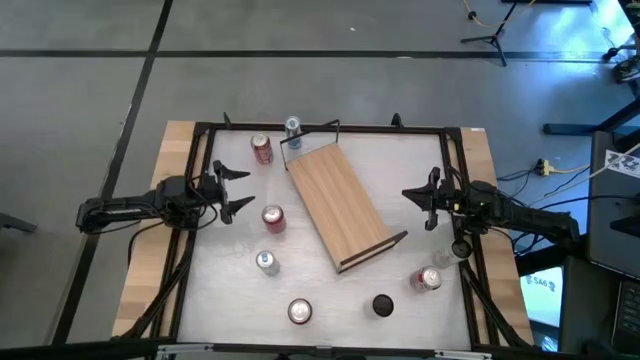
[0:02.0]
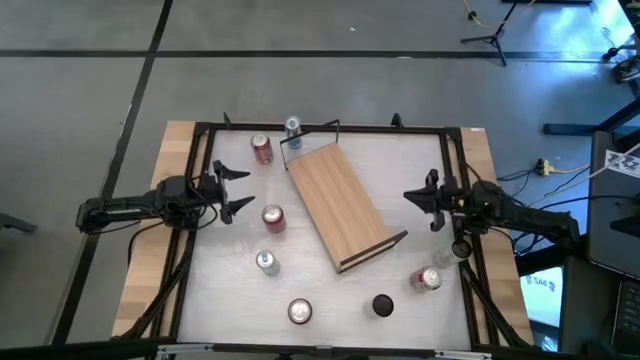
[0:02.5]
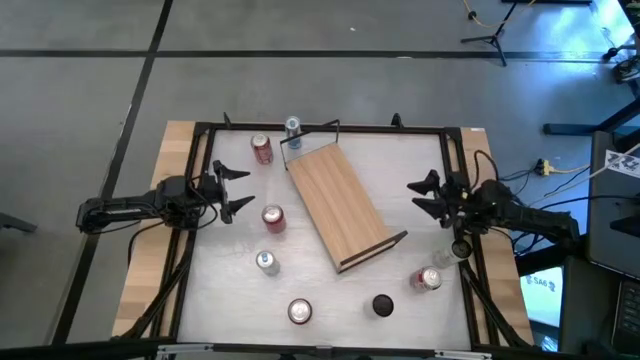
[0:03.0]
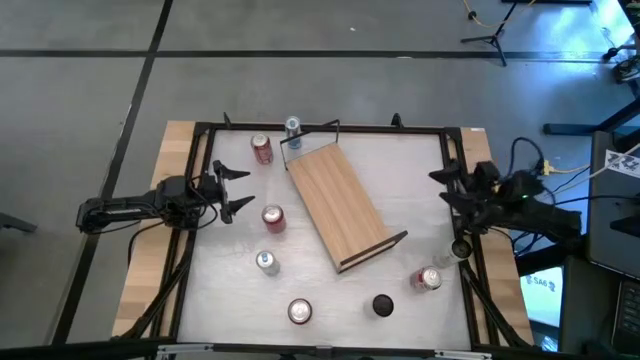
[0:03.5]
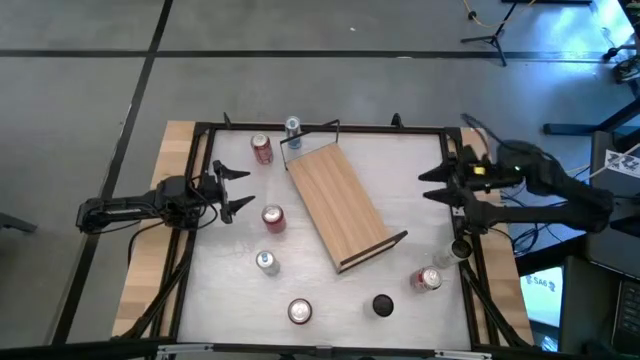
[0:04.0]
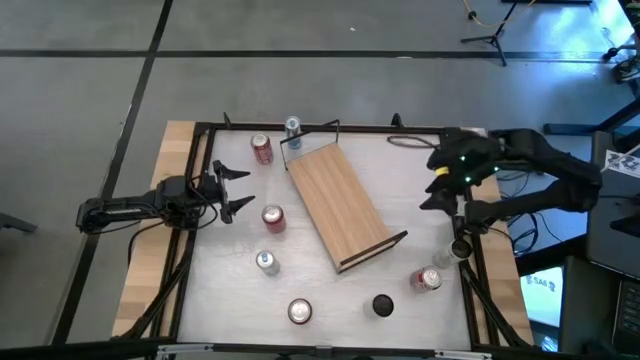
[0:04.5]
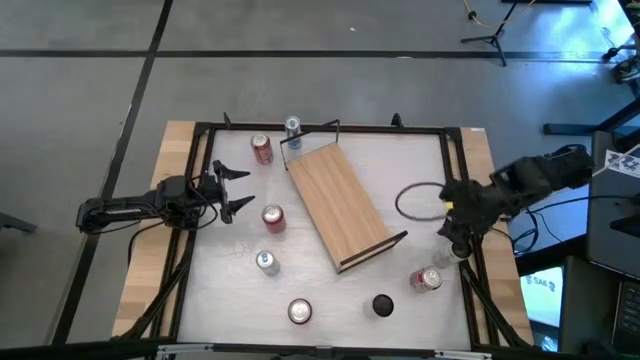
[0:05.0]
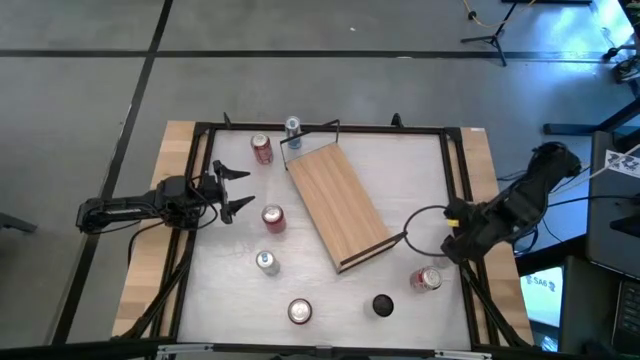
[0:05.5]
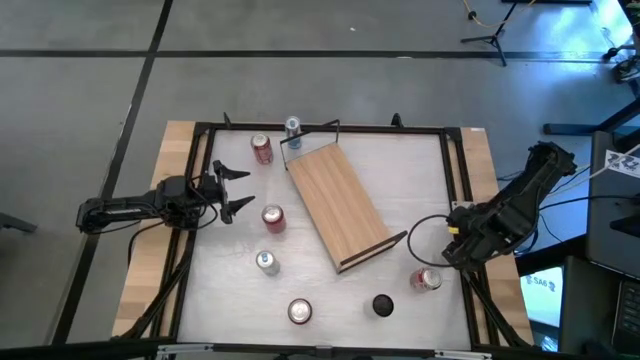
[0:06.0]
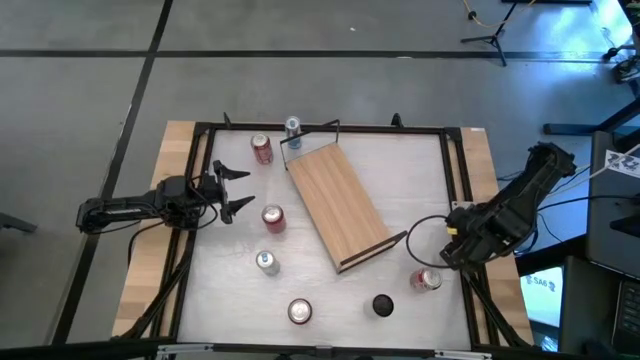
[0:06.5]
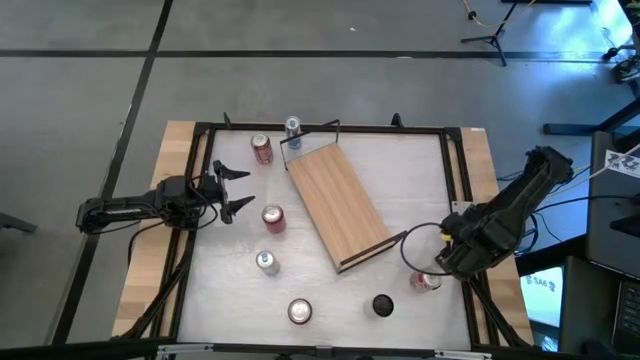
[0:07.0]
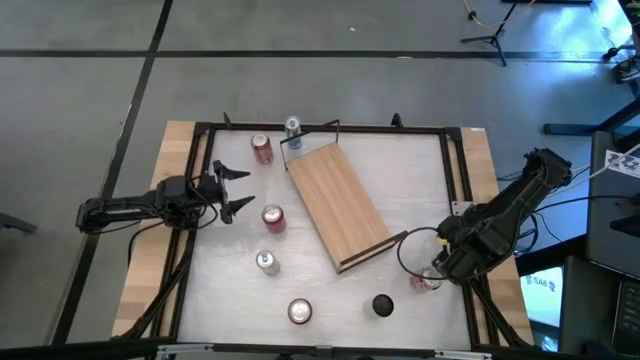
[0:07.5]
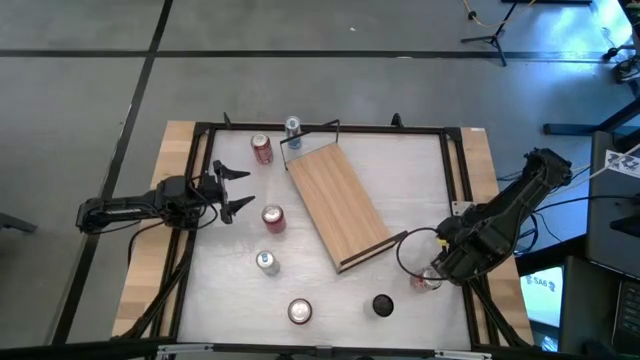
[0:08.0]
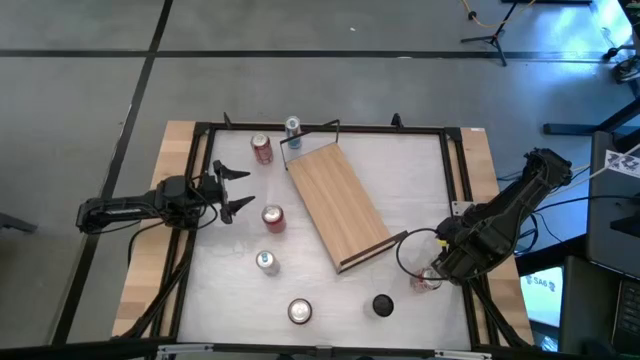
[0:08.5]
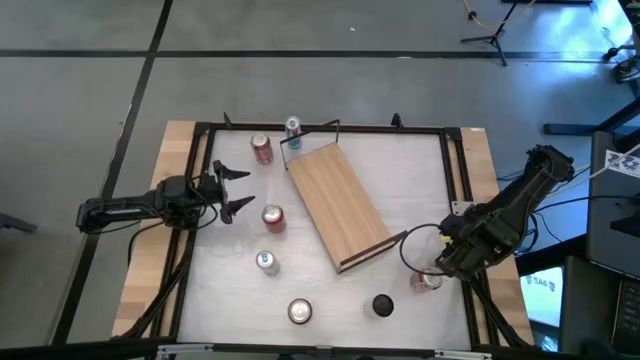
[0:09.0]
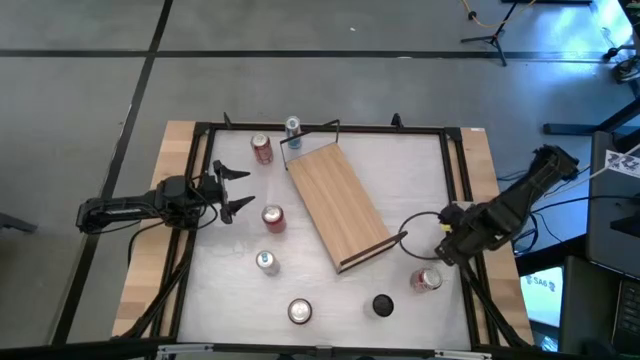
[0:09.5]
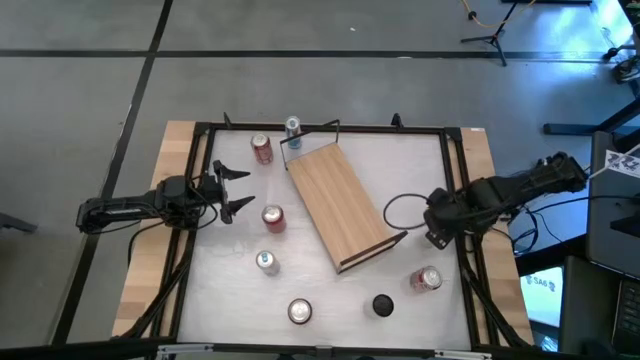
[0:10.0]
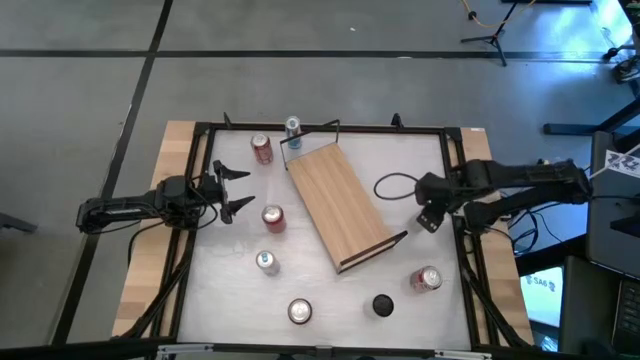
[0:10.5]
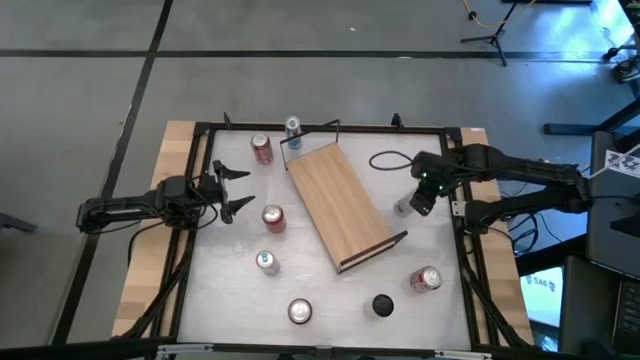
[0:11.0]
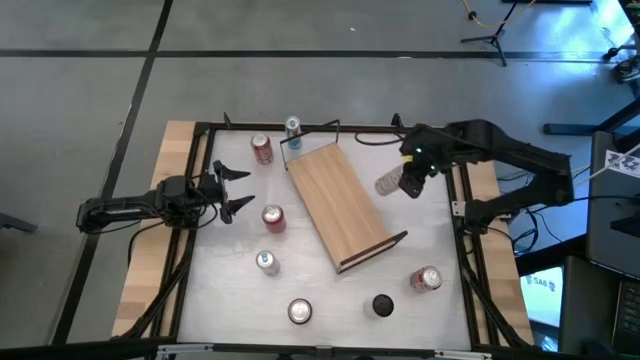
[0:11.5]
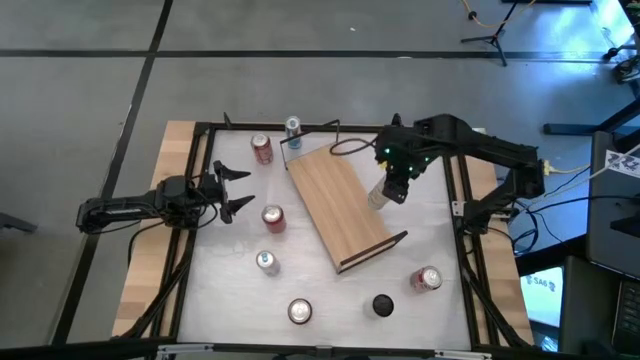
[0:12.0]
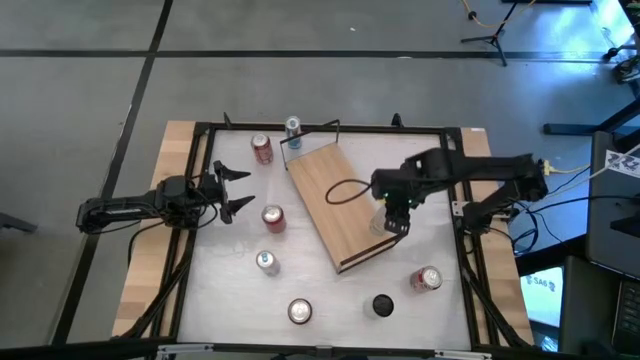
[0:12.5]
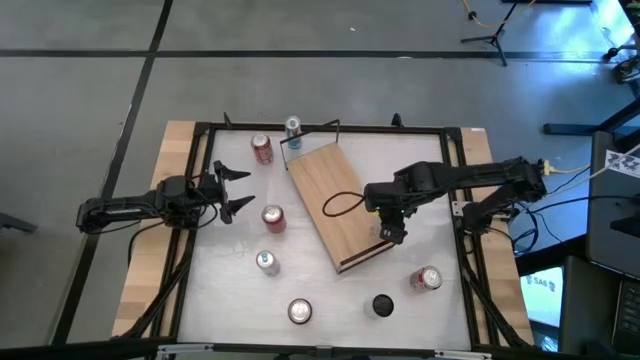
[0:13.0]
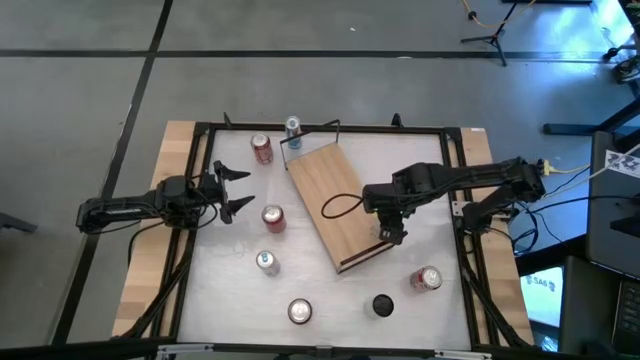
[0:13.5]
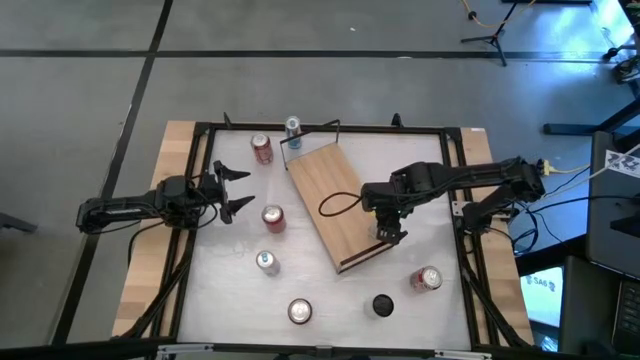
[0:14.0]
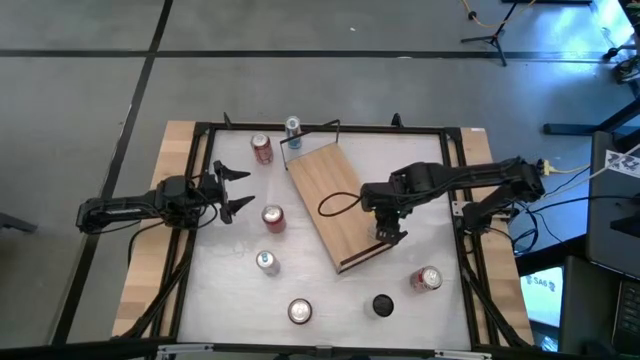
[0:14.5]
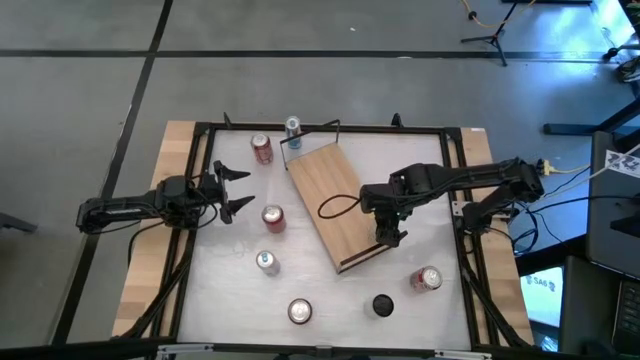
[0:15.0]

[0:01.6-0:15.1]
Task: Place canned beverage on shelf
Put the top white yellow soda can on the shelf

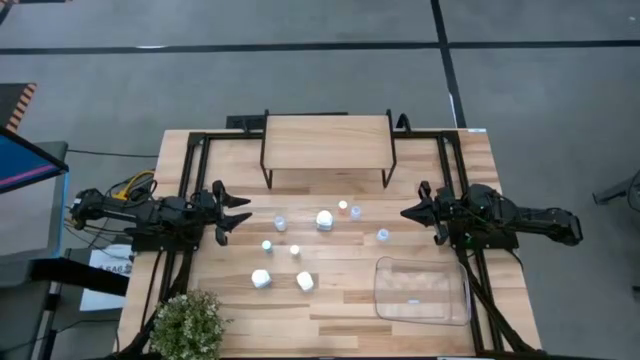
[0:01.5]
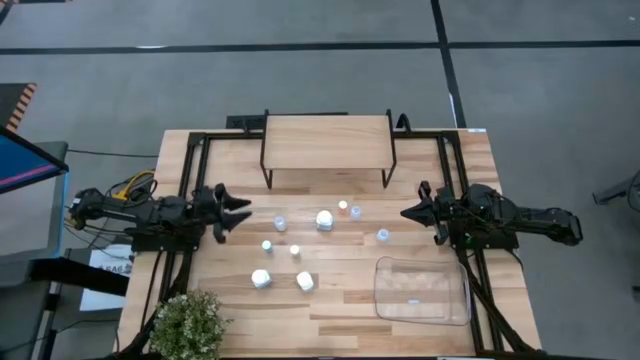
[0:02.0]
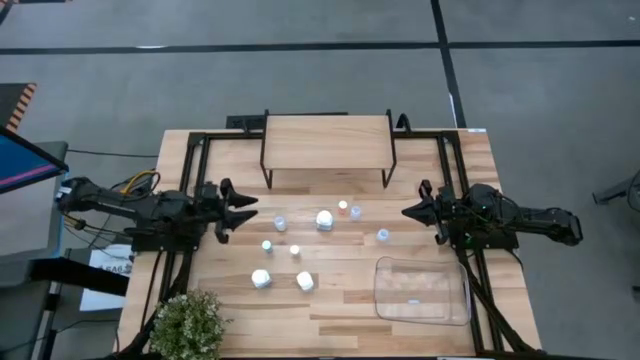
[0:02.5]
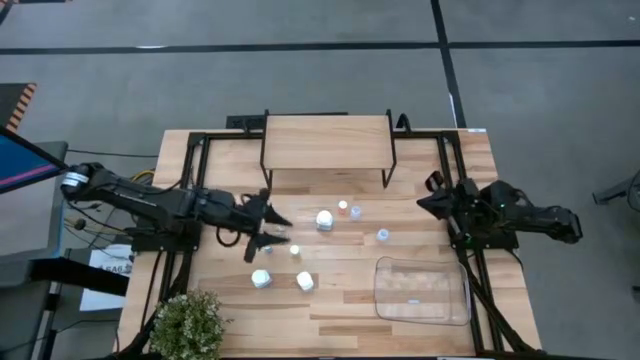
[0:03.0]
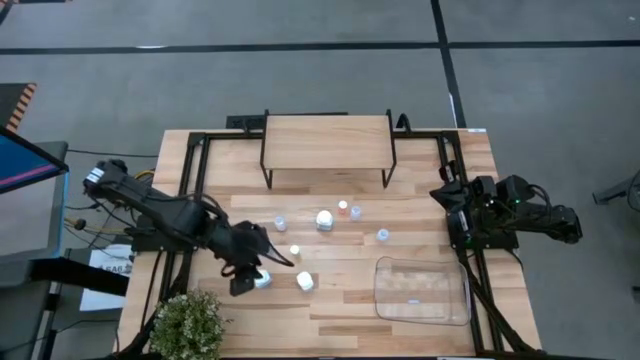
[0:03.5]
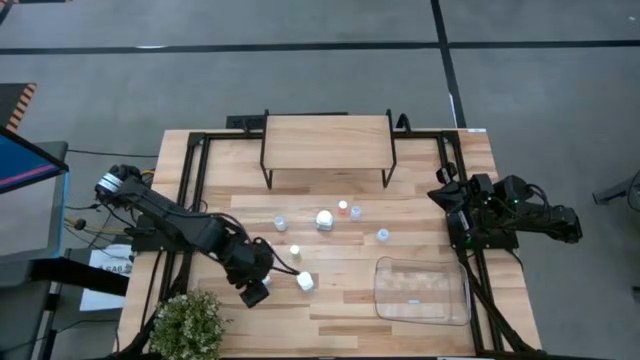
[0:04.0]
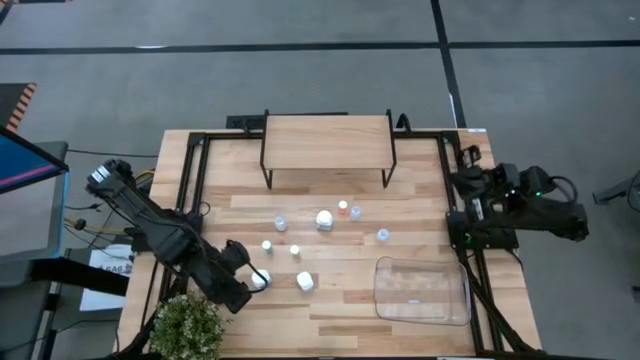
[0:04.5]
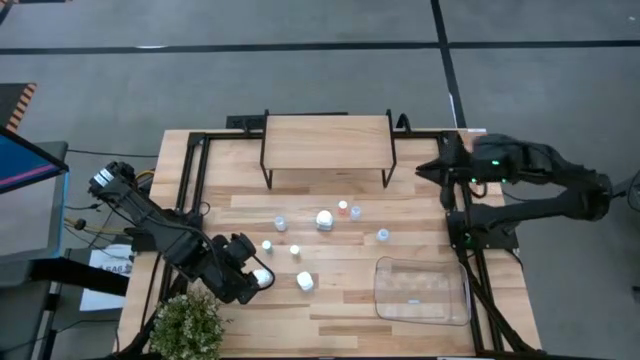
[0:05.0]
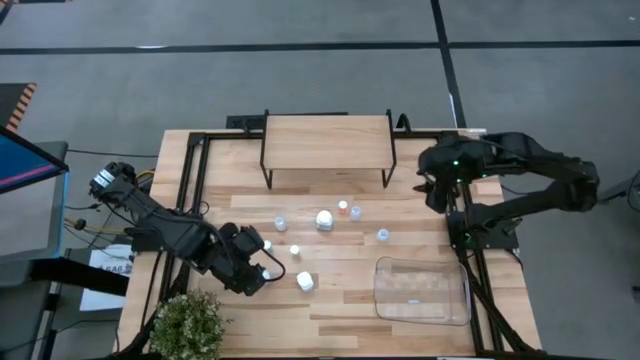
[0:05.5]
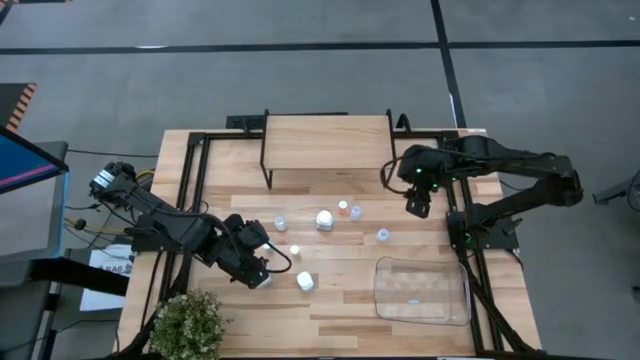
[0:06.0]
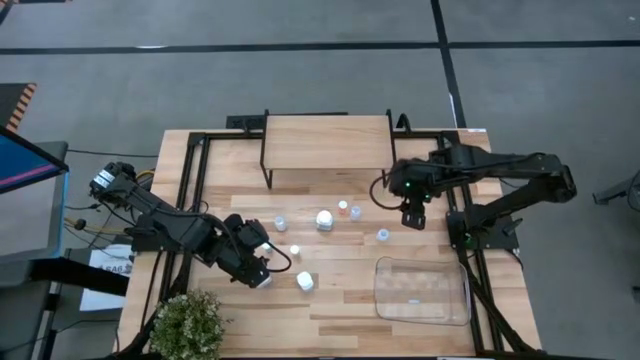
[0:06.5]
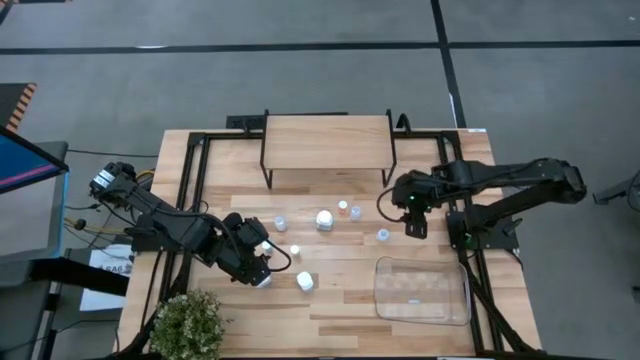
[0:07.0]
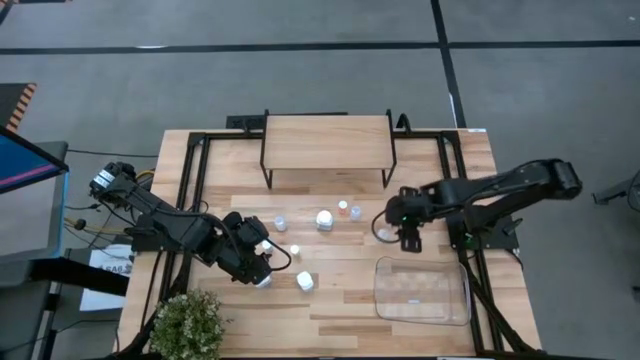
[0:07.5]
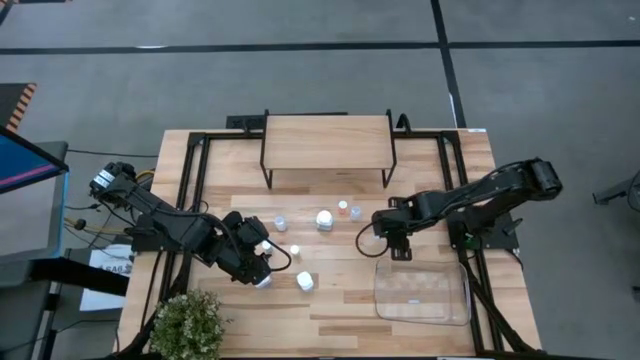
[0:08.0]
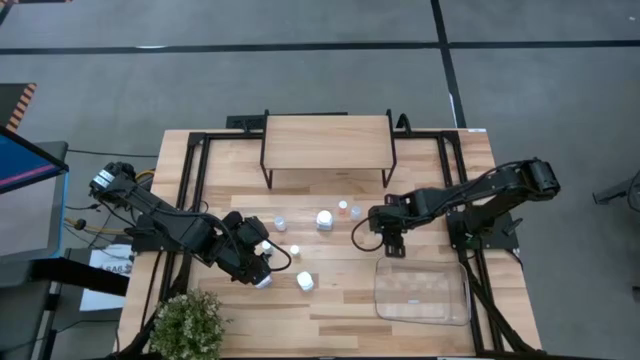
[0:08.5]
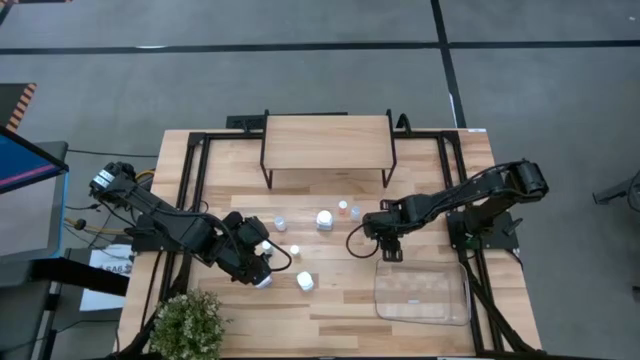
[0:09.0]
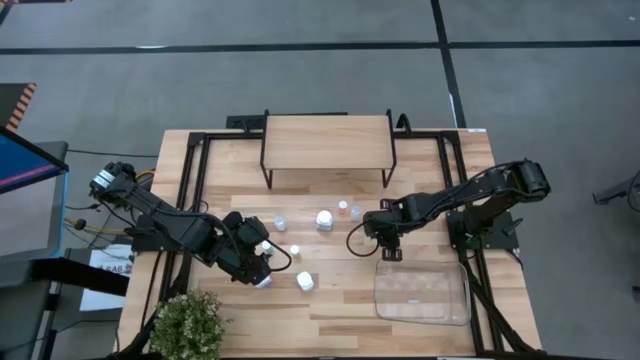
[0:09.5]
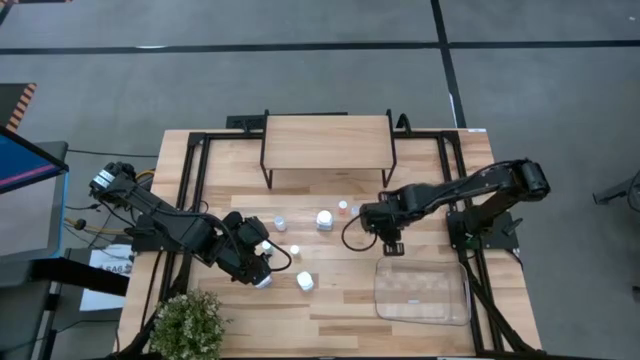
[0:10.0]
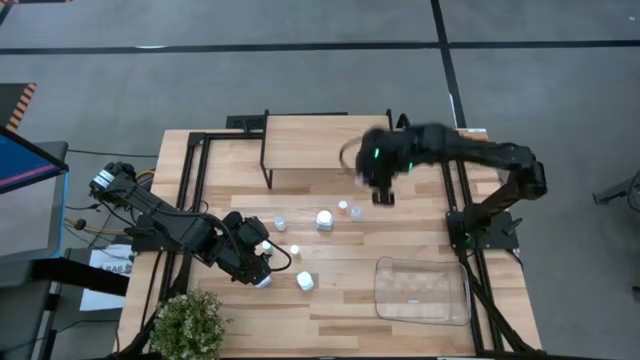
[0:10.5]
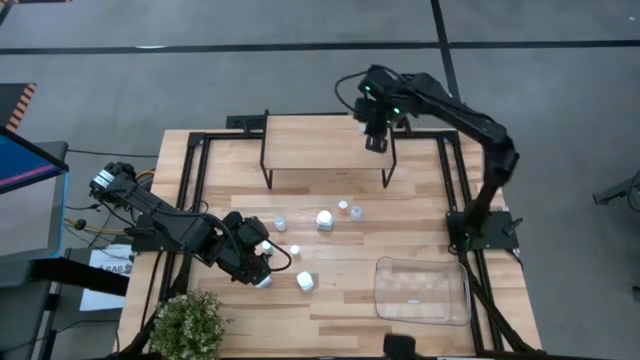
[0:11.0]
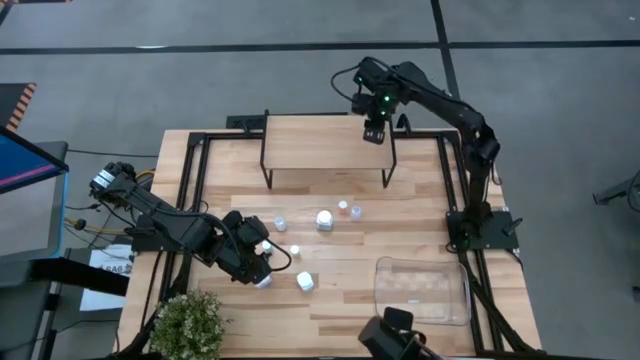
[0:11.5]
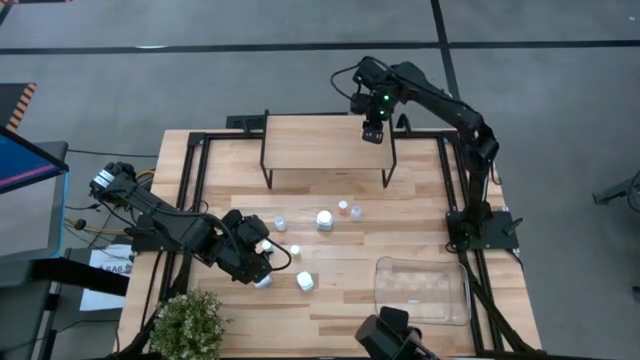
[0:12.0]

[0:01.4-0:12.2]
Task: Pick and place medicine bottles onto shelf by color
Put the right transparent pill bottle on the shelf
